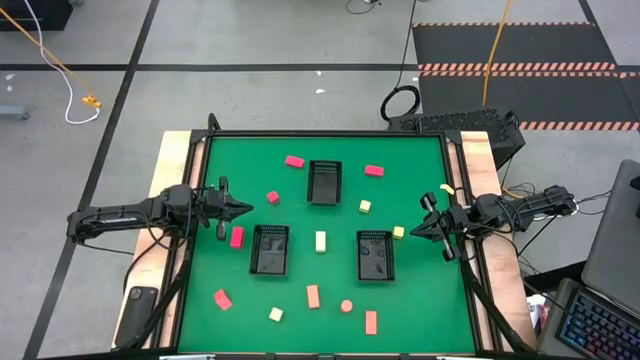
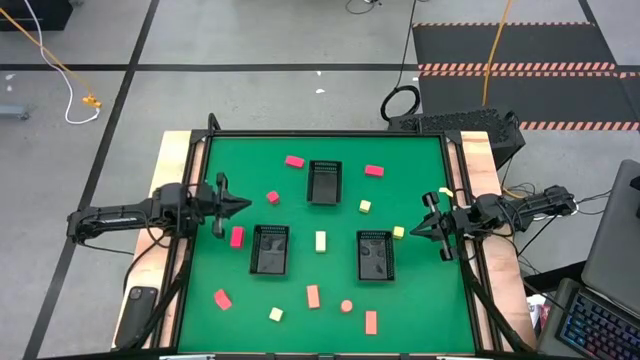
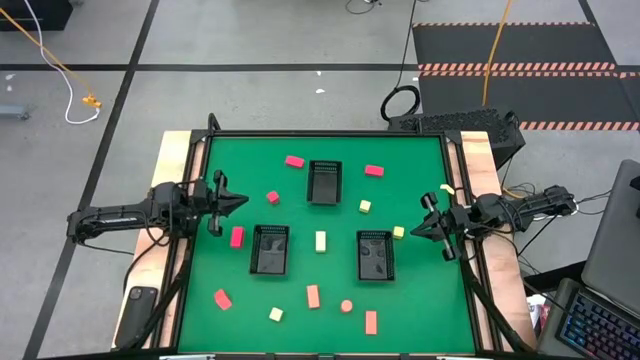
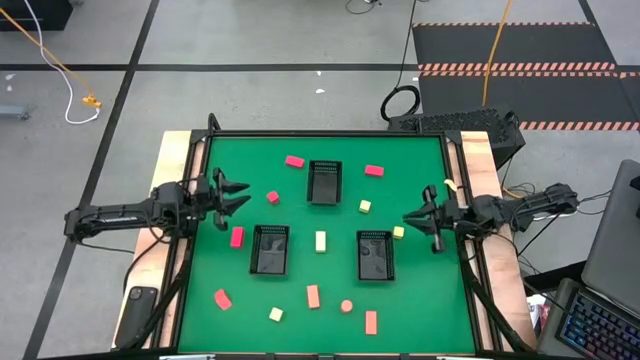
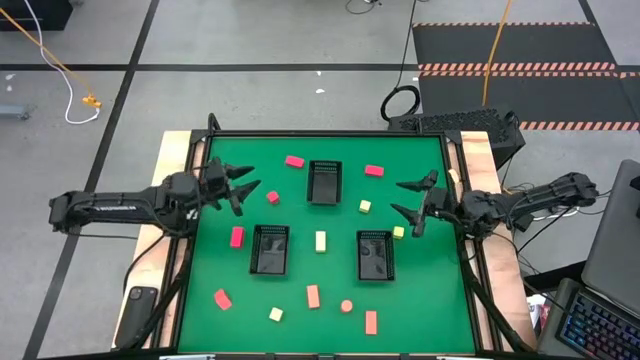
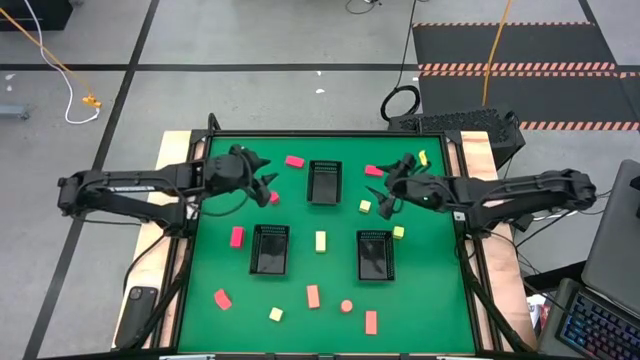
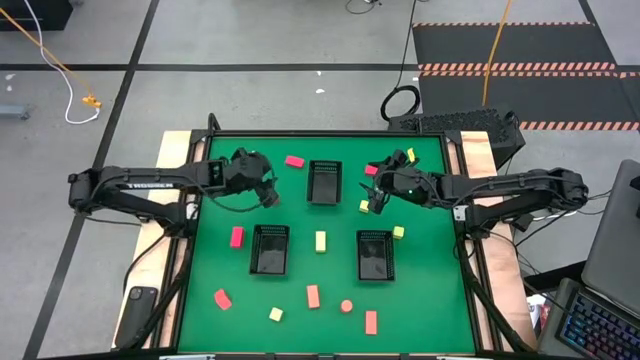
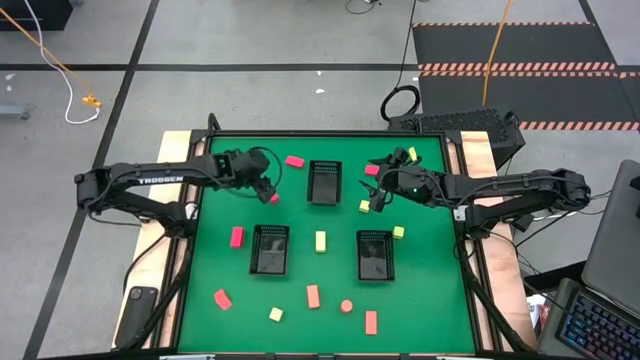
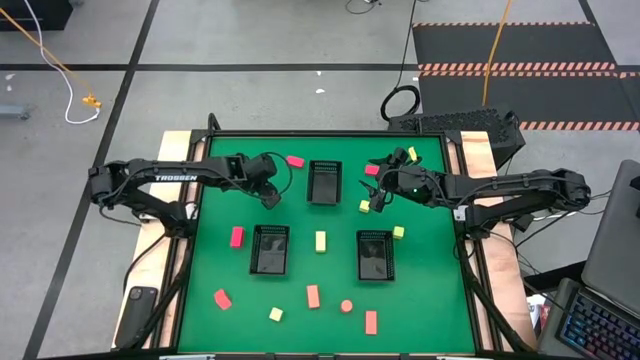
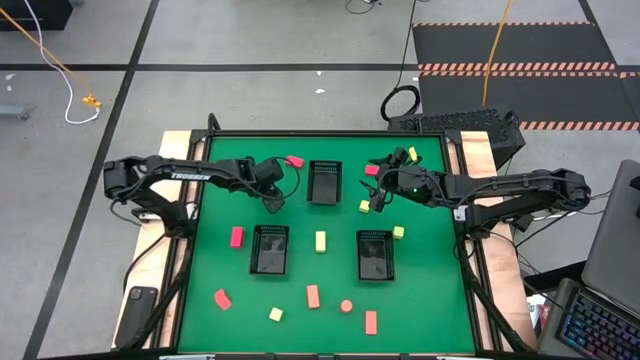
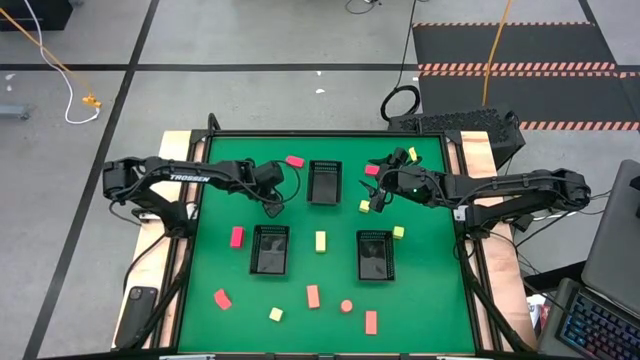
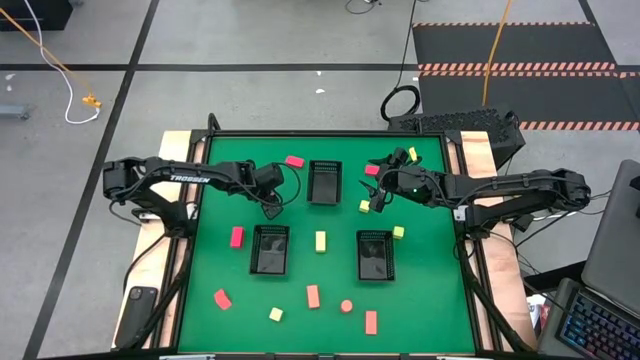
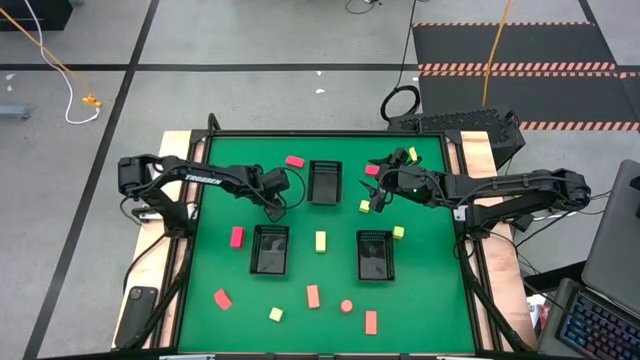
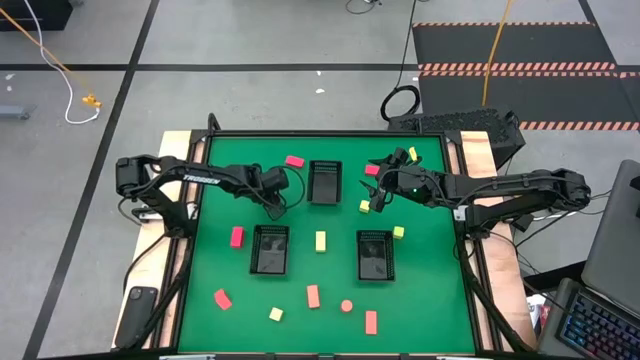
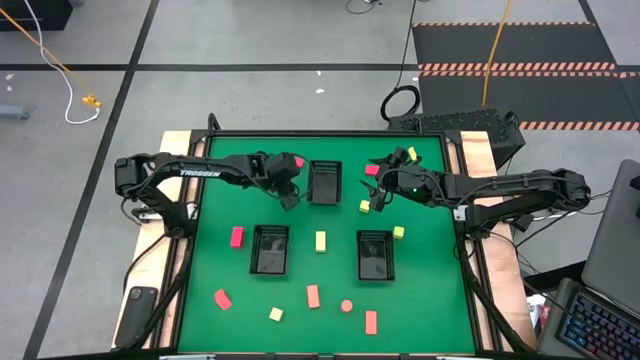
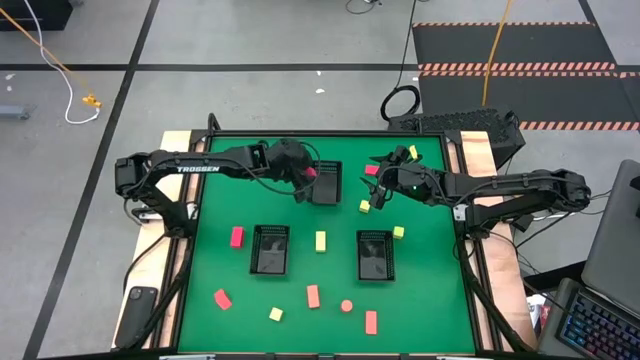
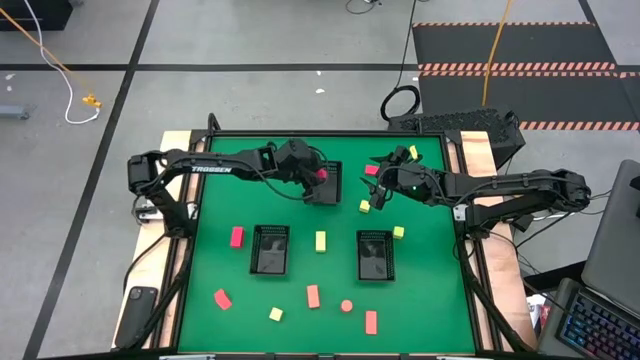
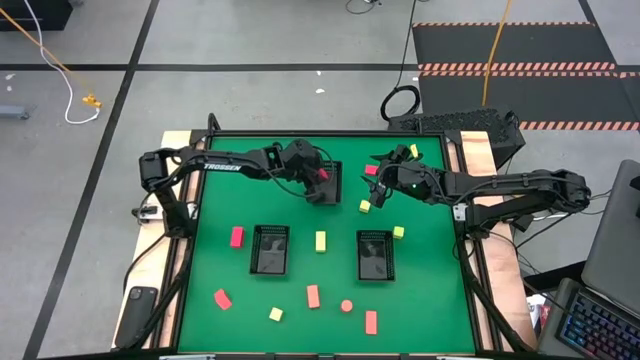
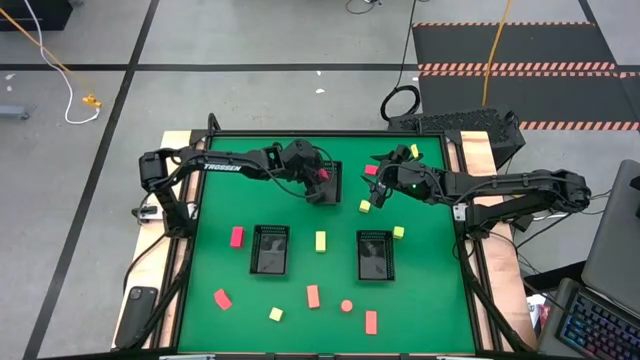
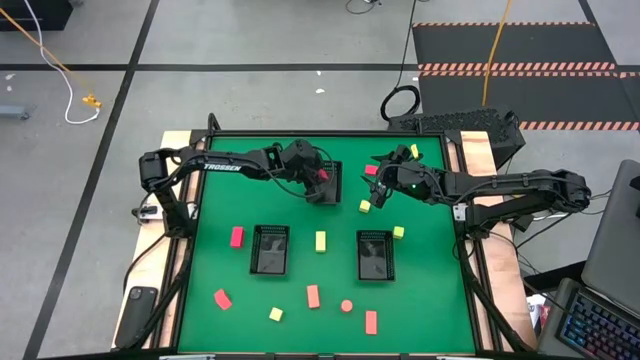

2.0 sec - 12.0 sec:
Task: Sort & place blocks by color
Put the red block into the top black bin

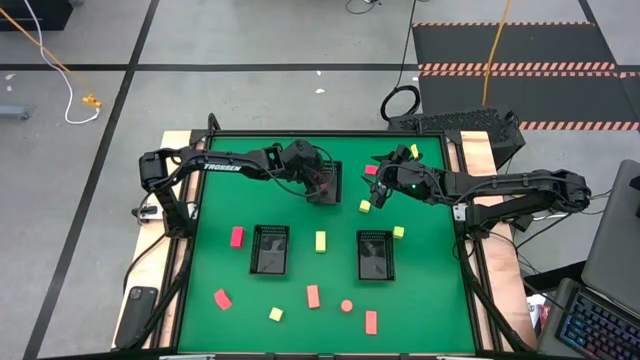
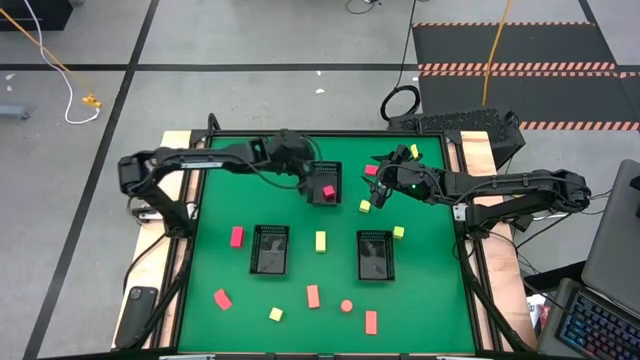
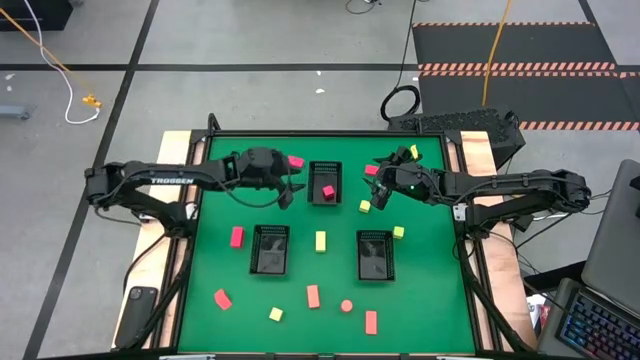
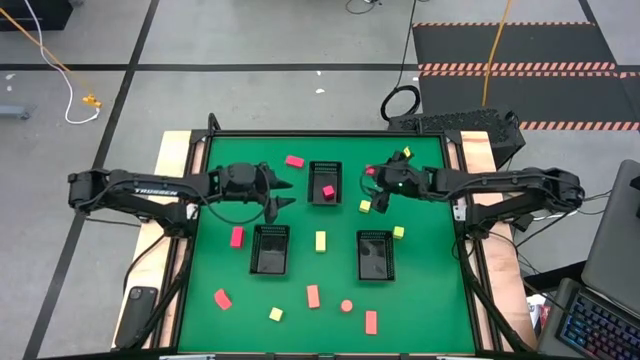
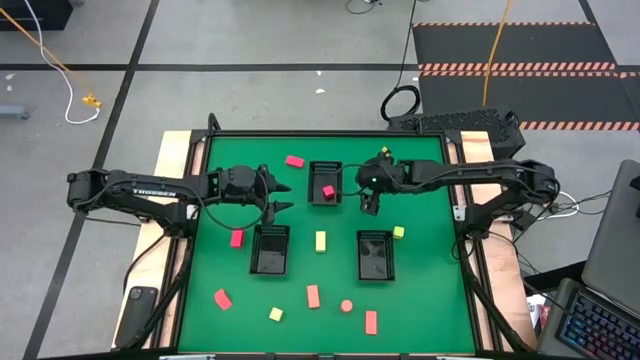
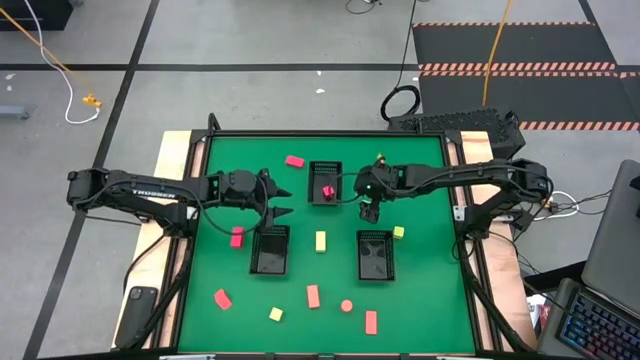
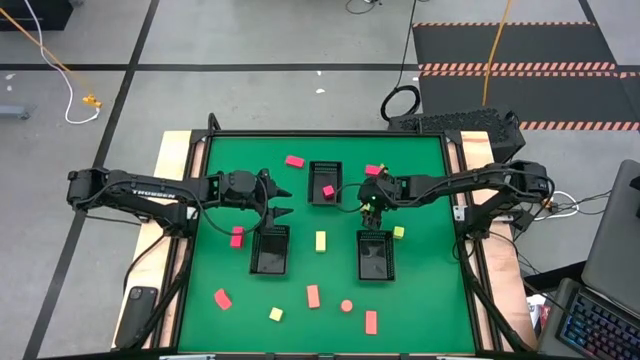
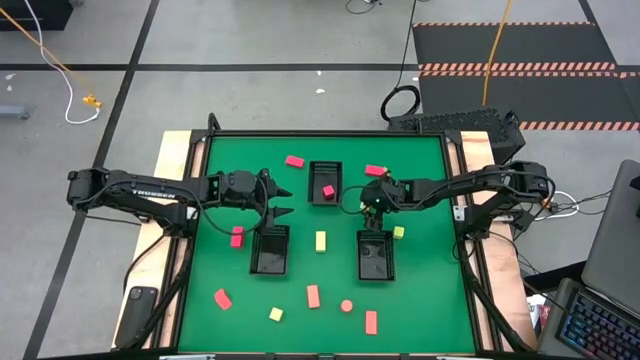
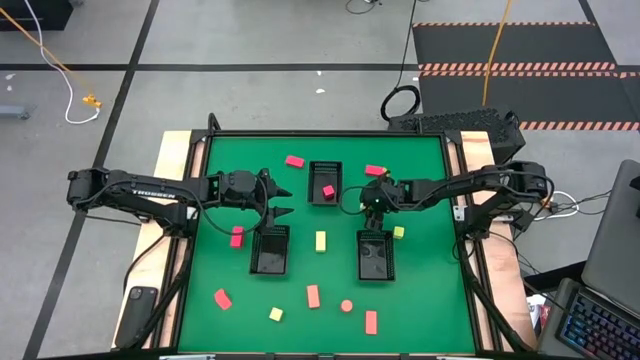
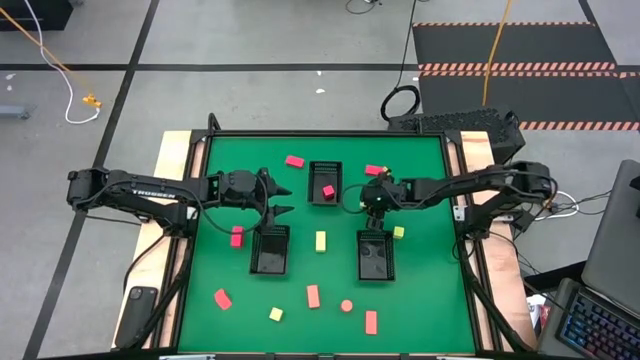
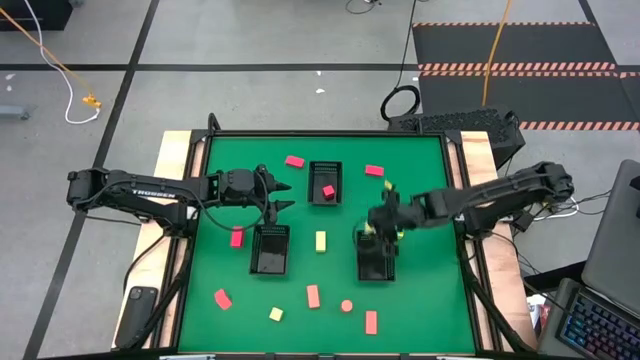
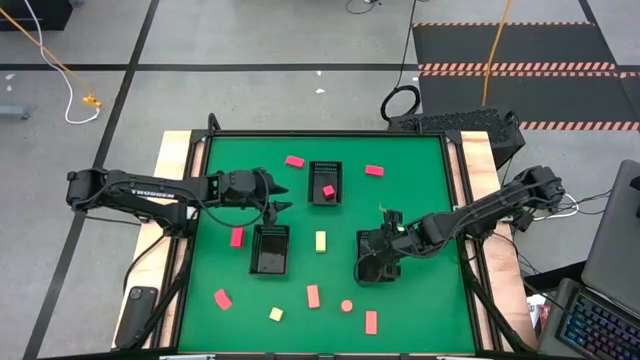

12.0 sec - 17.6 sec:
Put the green block into the bottom right black bin

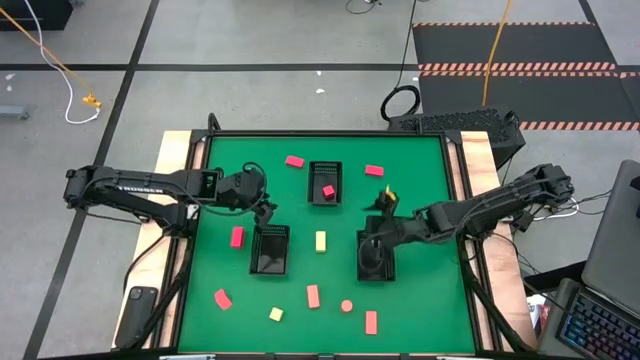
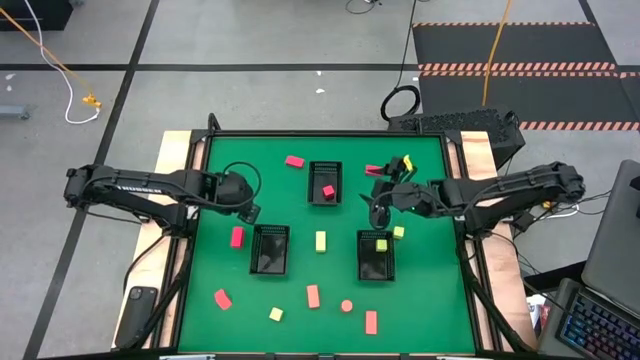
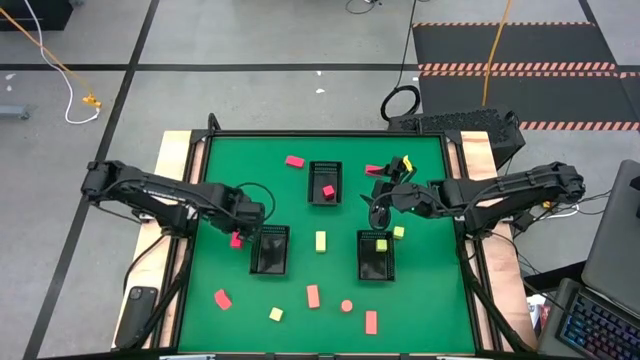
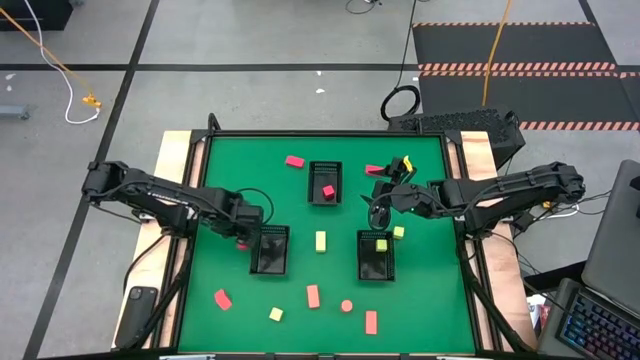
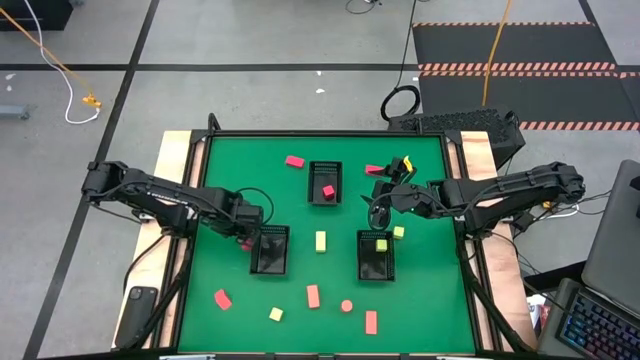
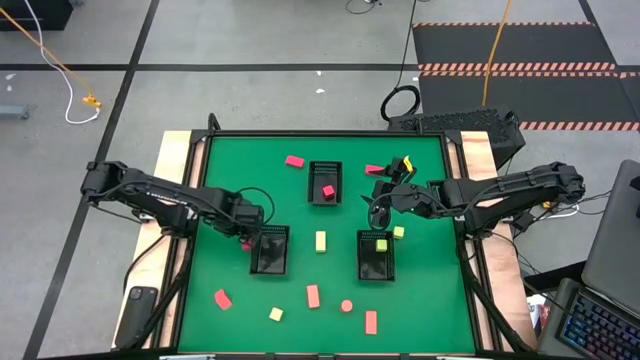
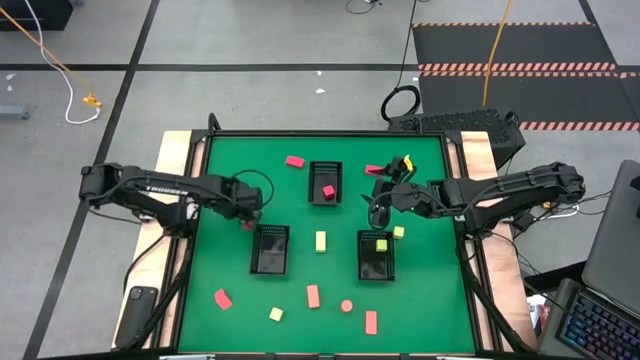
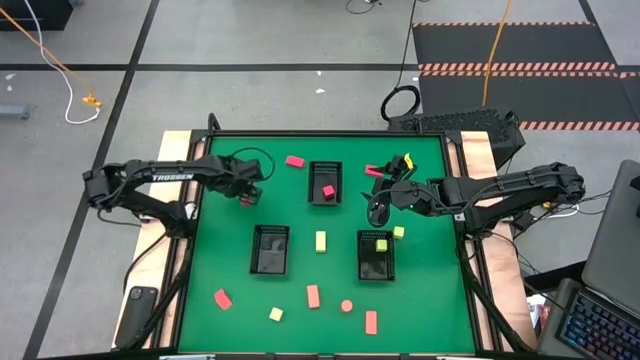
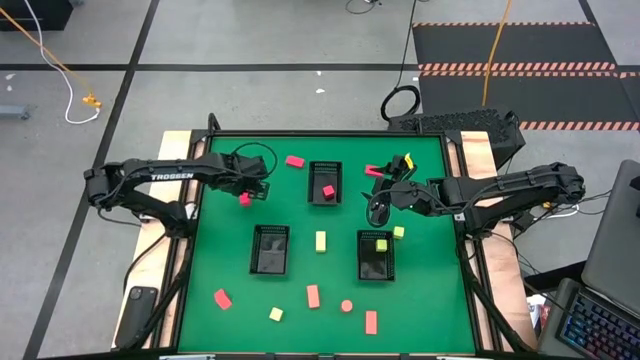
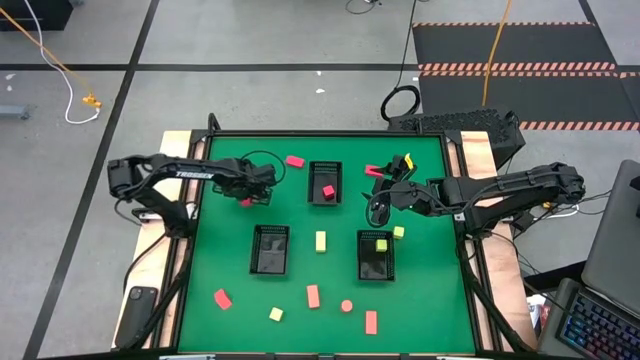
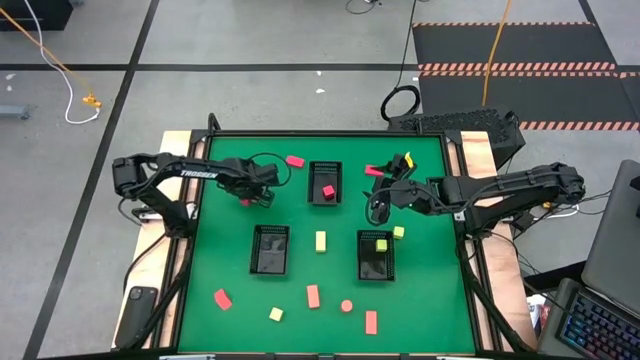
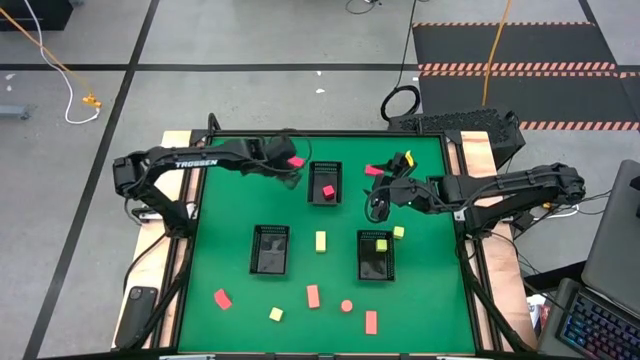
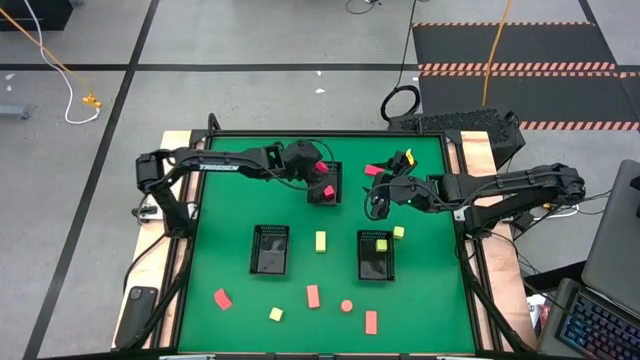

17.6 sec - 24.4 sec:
Put the red block into the top black bin
